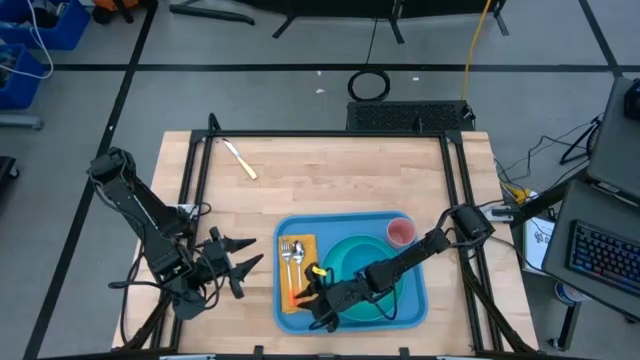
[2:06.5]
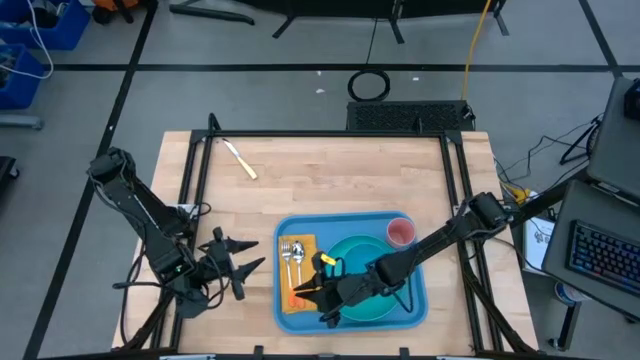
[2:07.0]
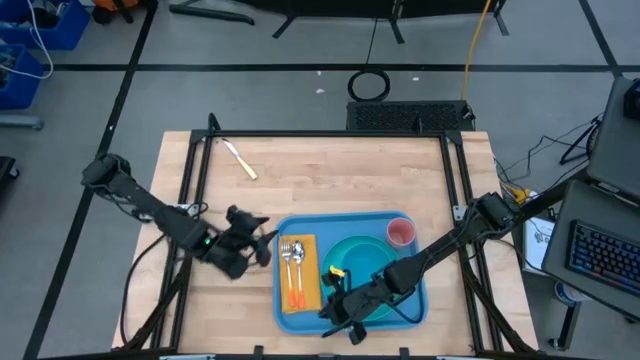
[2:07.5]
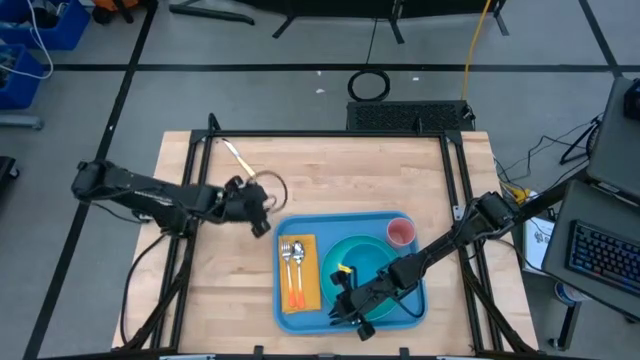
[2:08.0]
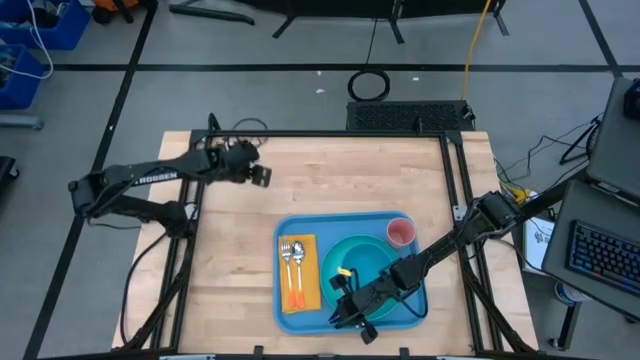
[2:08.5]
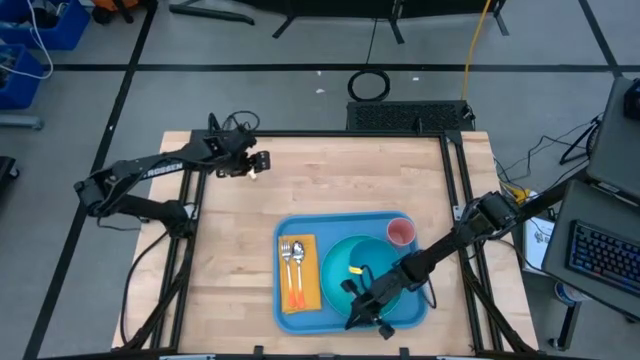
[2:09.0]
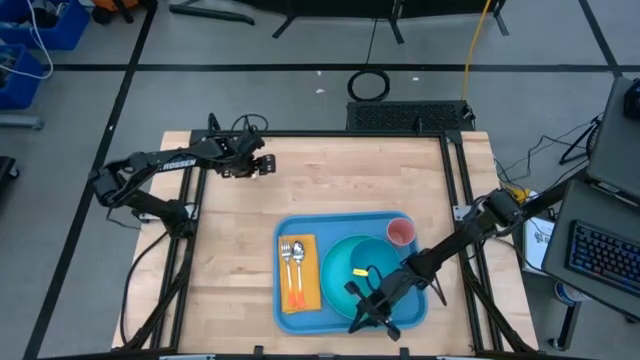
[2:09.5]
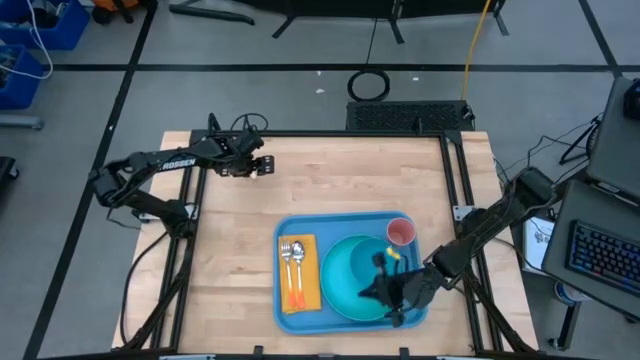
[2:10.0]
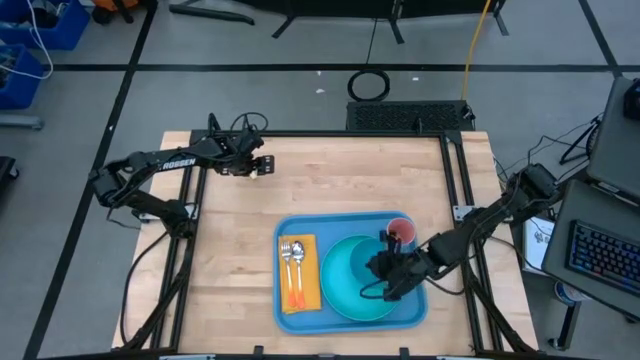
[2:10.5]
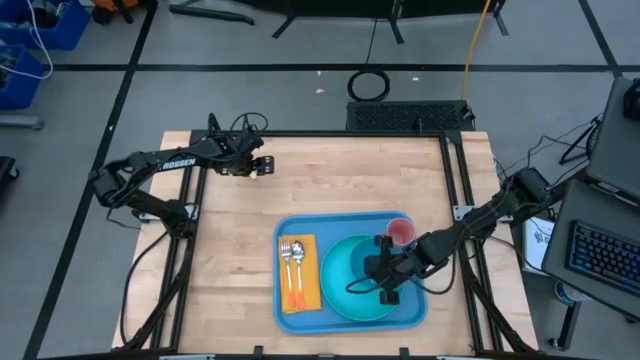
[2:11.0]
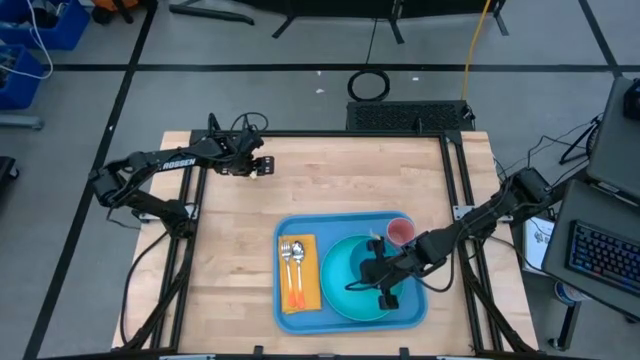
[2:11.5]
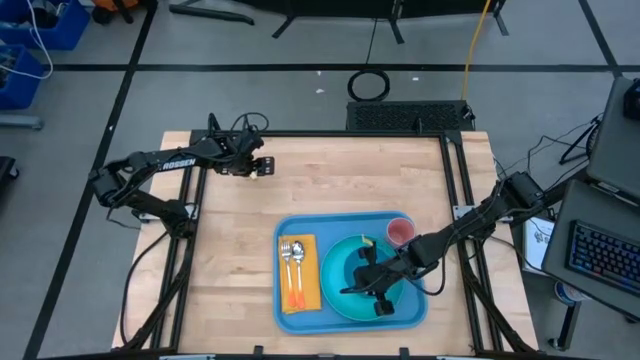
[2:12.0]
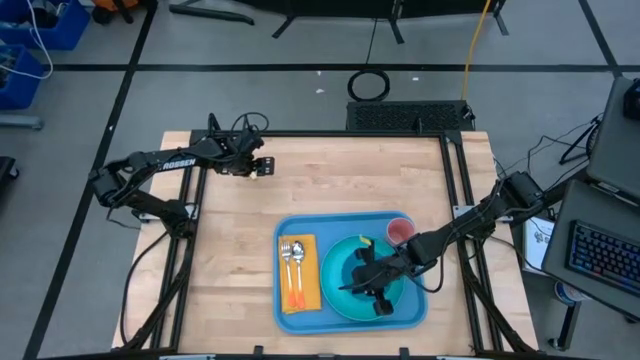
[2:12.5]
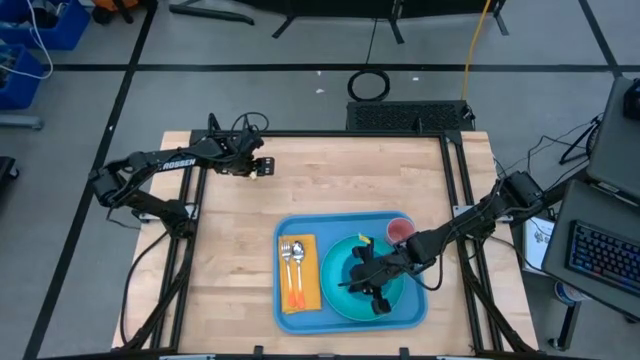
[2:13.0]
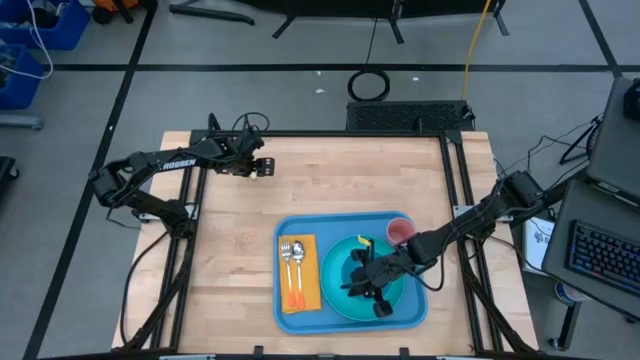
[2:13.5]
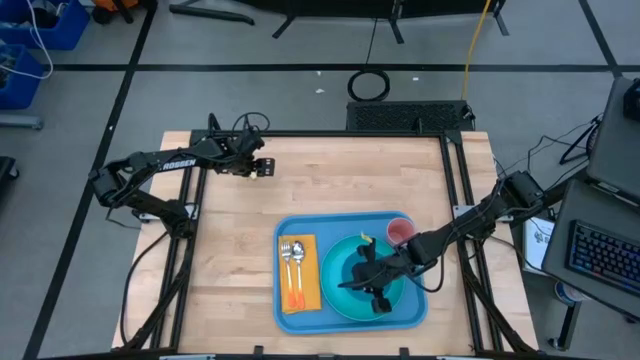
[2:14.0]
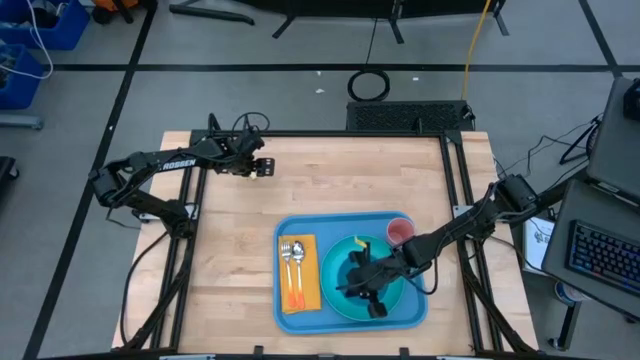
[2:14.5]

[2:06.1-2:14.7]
Task: Set up tray
Adjust the blue bowl on the blue plate

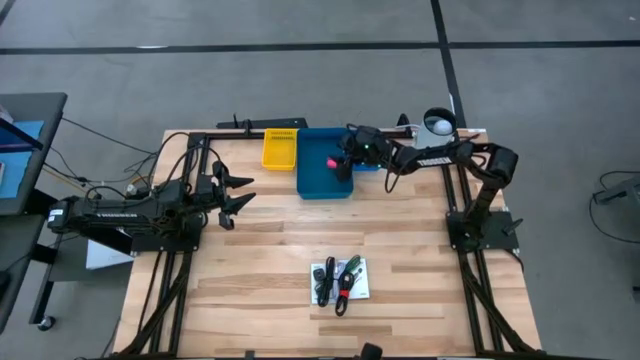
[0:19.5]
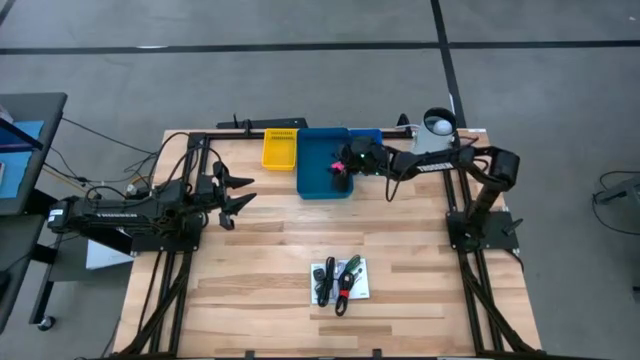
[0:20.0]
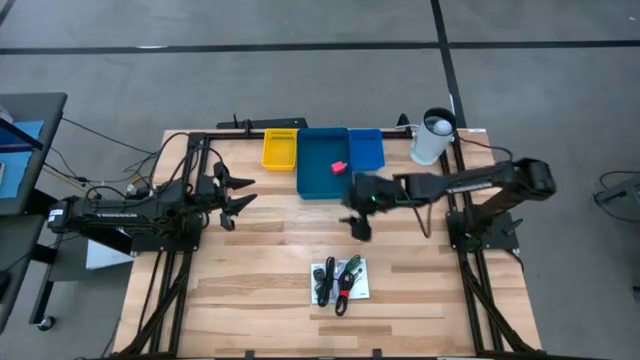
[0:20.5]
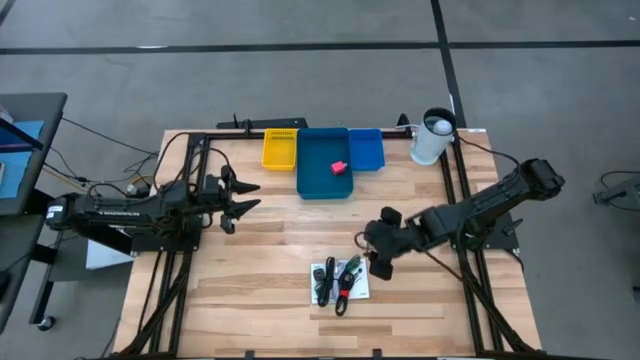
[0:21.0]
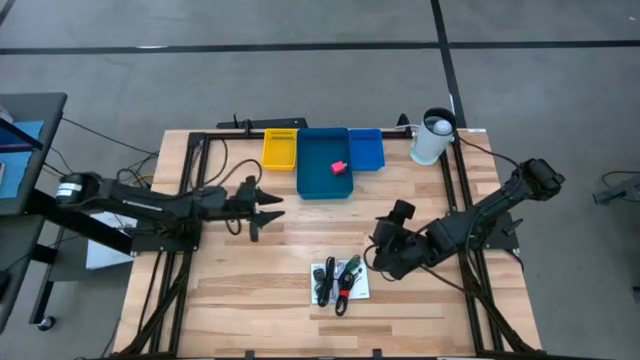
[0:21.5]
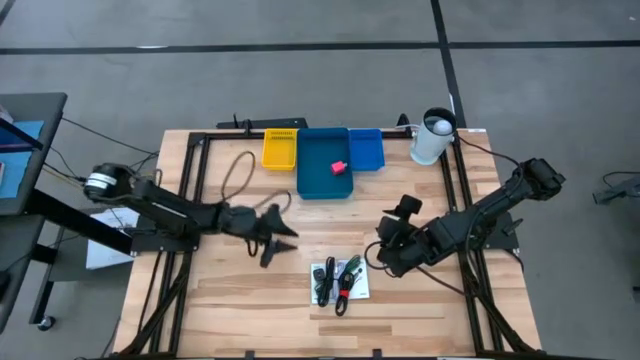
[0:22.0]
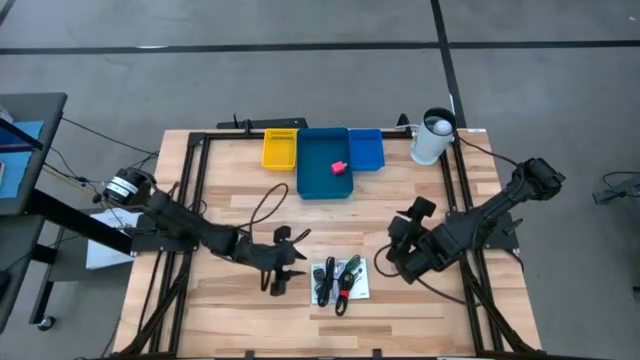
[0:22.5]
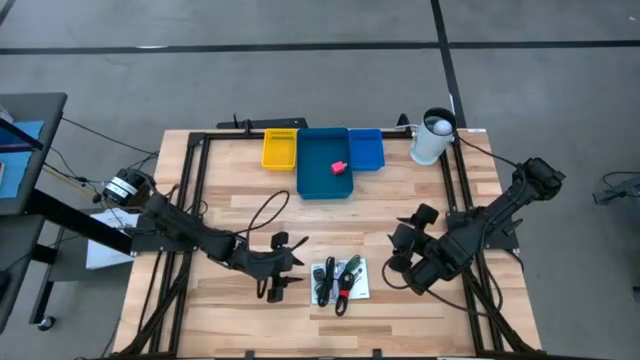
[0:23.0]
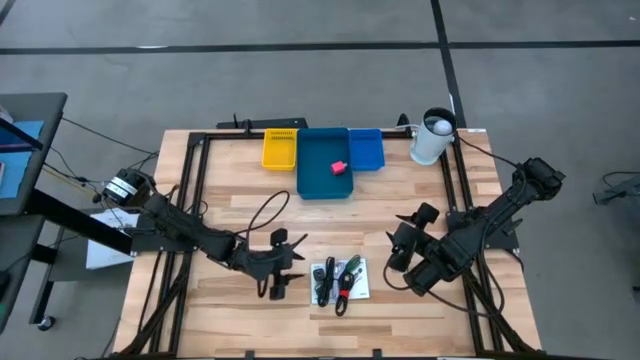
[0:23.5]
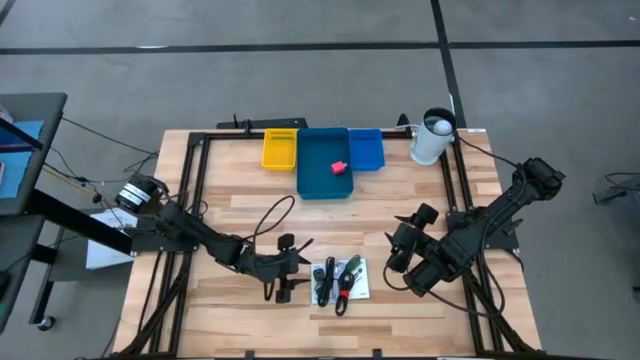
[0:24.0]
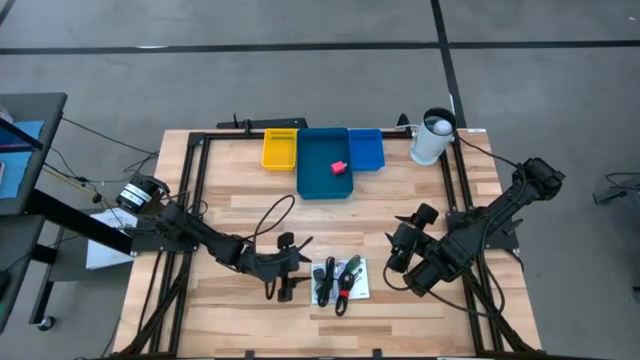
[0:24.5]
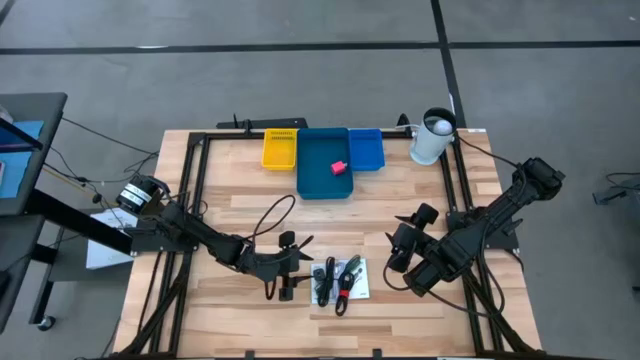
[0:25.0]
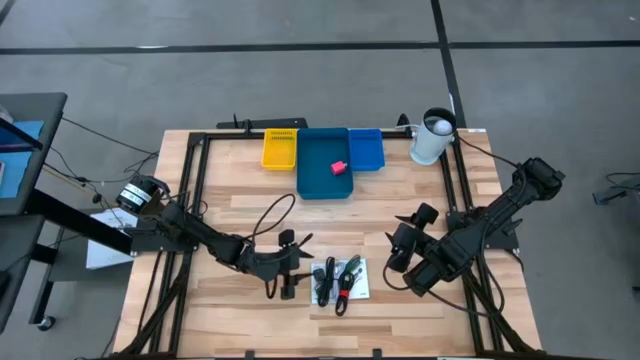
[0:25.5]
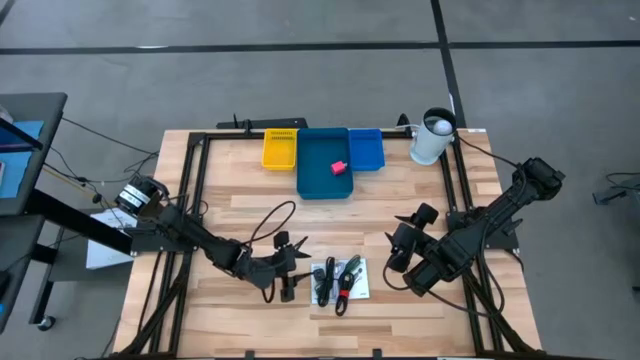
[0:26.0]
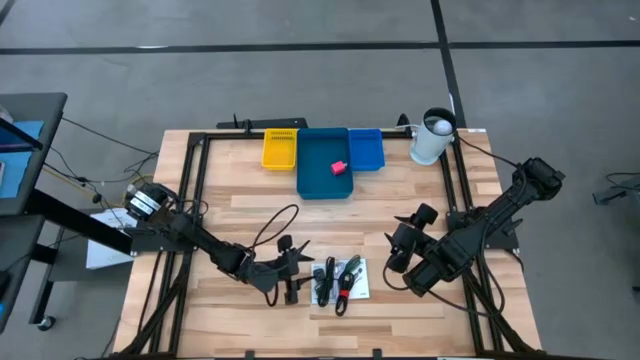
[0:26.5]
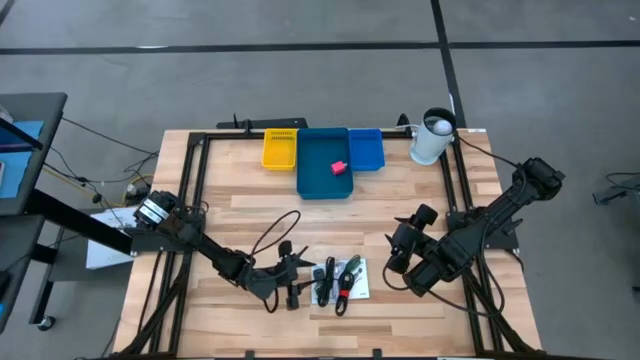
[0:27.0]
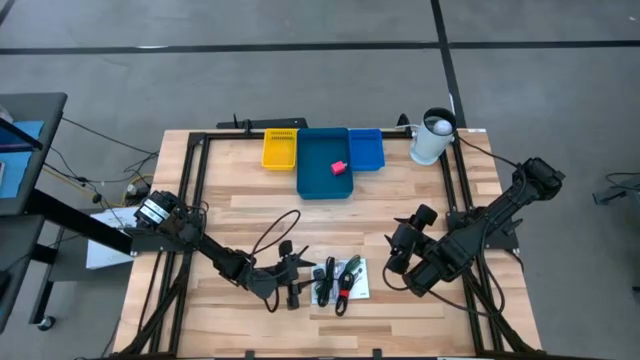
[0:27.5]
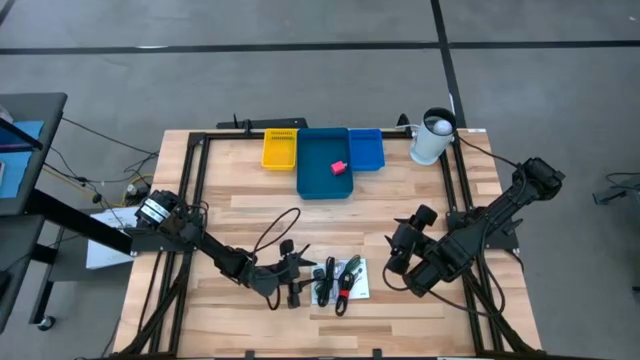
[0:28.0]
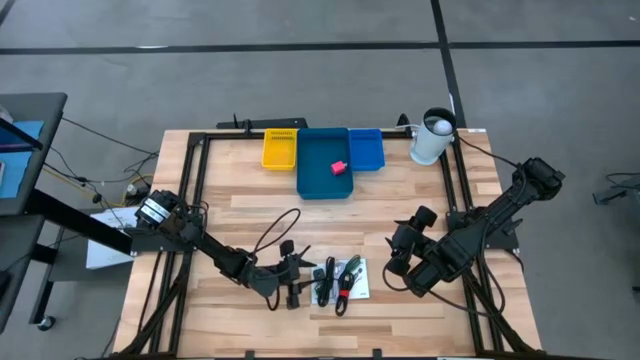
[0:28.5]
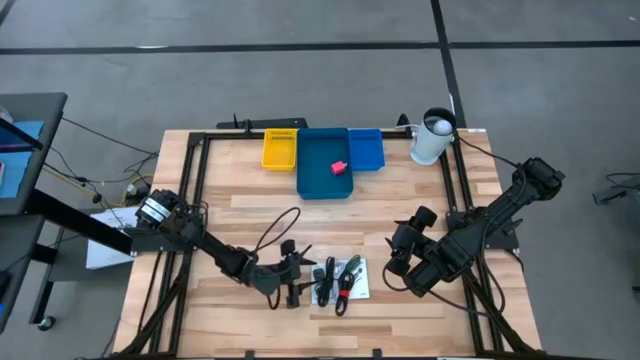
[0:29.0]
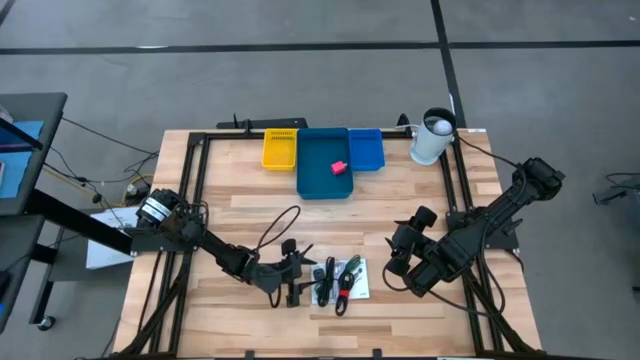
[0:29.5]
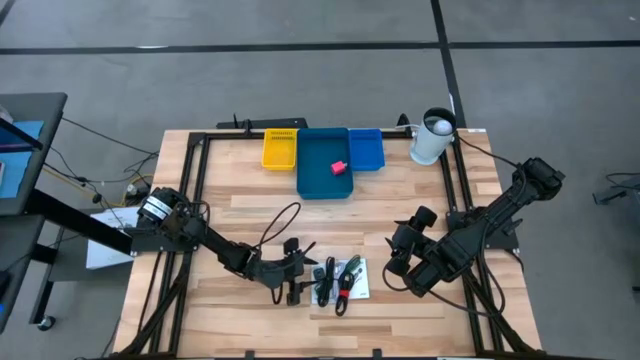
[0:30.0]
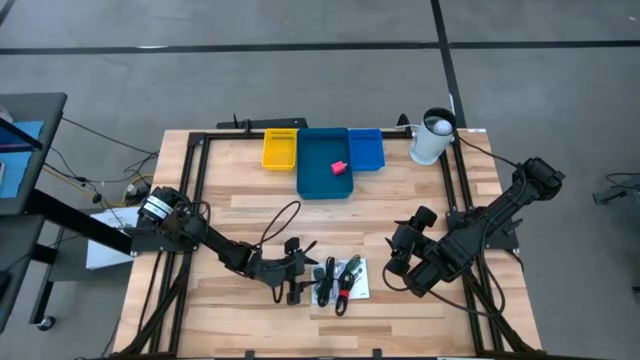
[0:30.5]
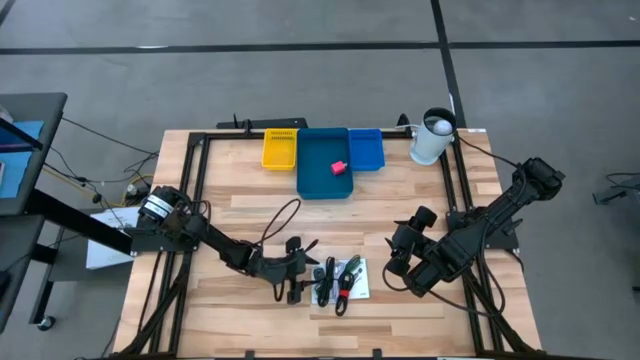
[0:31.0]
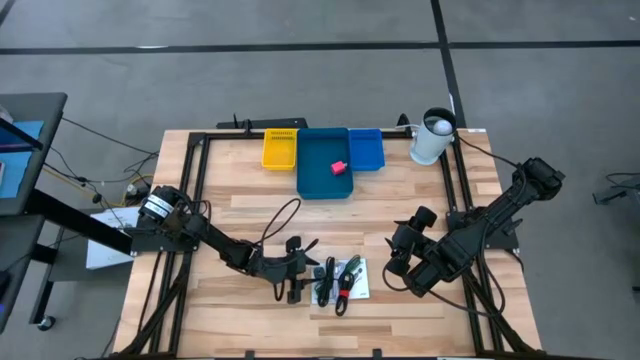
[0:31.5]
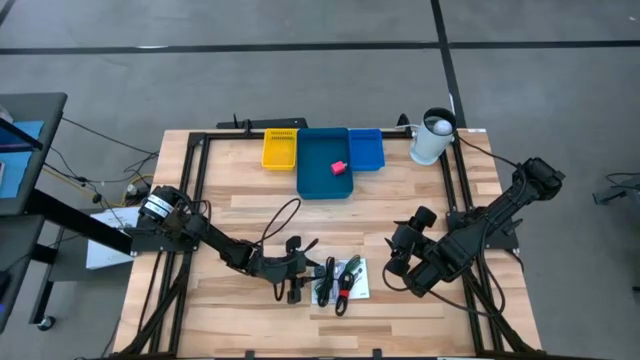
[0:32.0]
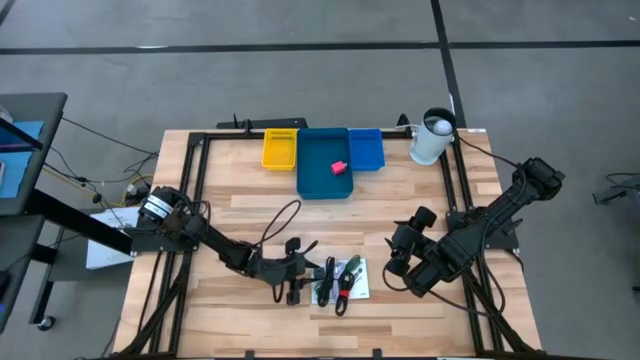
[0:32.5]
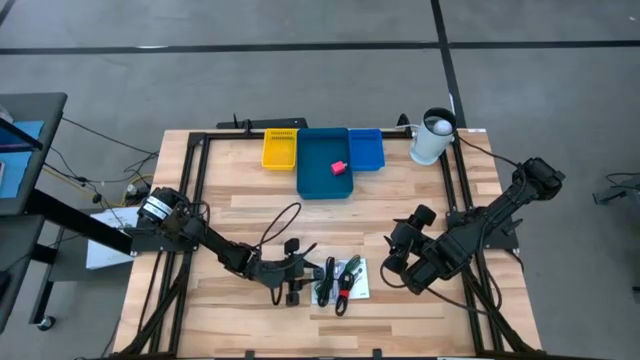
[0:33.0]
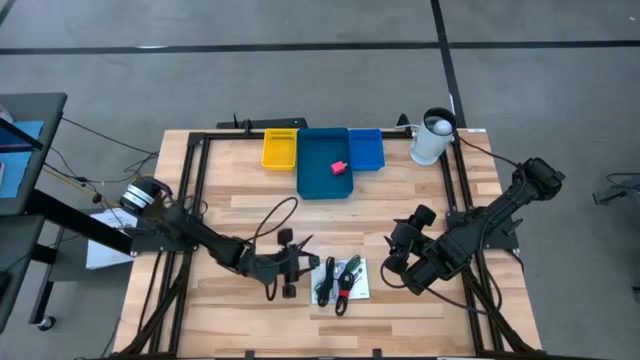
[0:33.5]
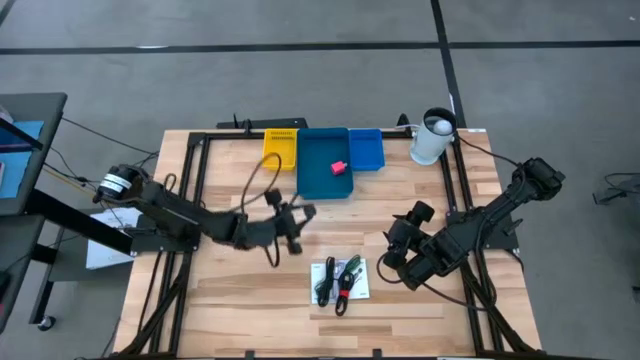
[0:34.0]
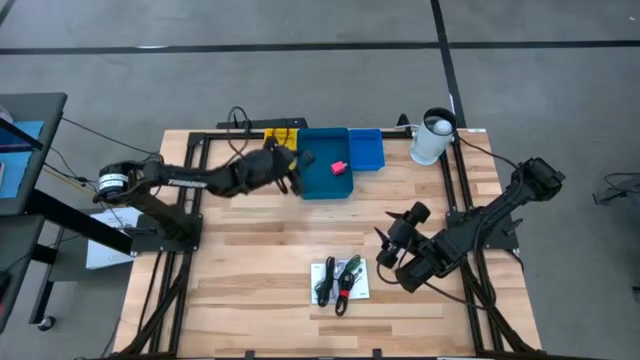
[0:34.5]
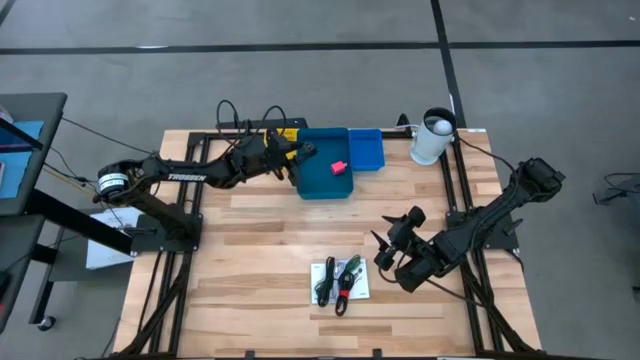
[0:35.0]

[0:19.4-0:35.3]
Task: Pick and place items into bin
Put the black charger adapter into the dark blue bin
